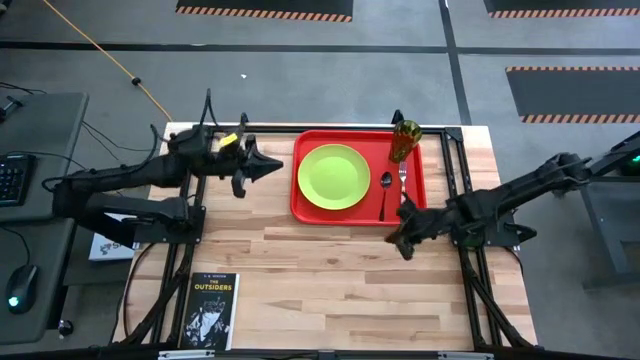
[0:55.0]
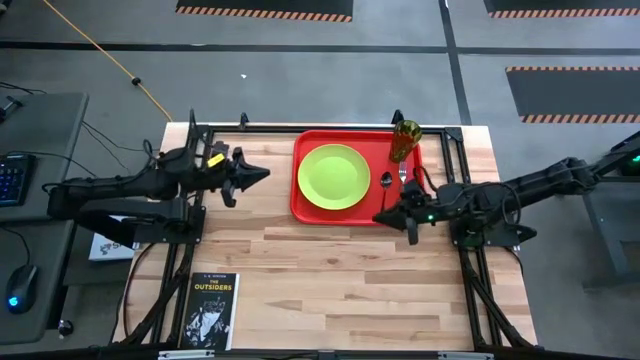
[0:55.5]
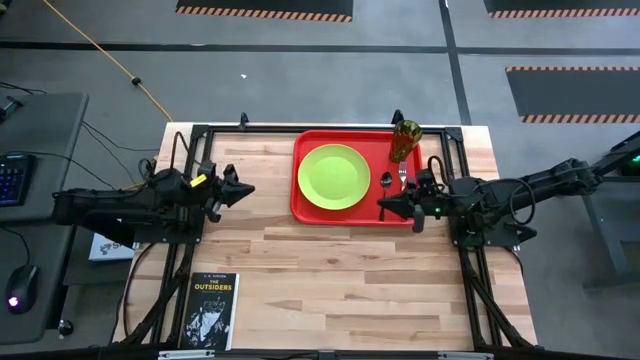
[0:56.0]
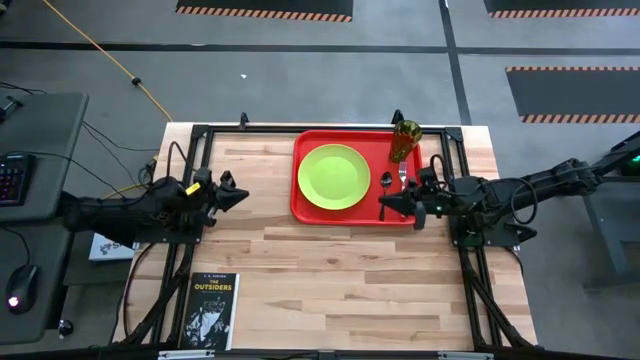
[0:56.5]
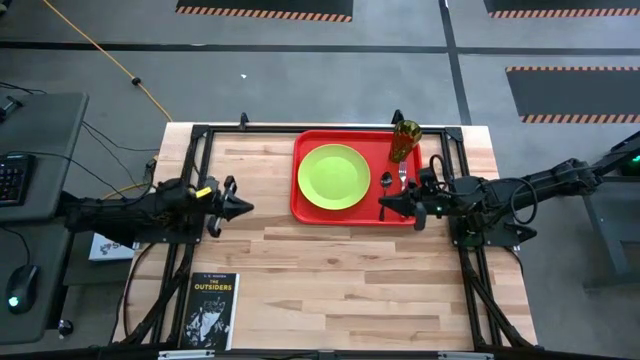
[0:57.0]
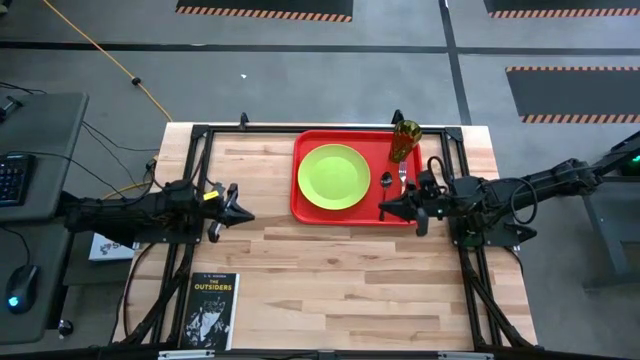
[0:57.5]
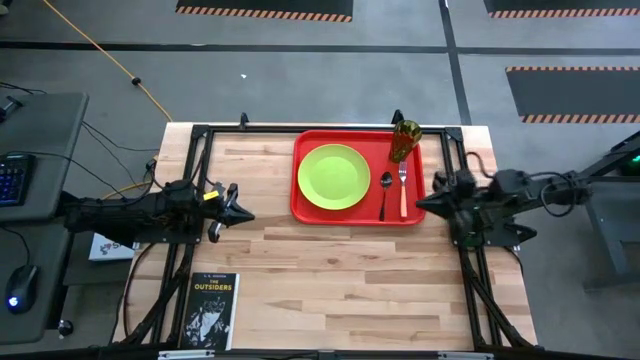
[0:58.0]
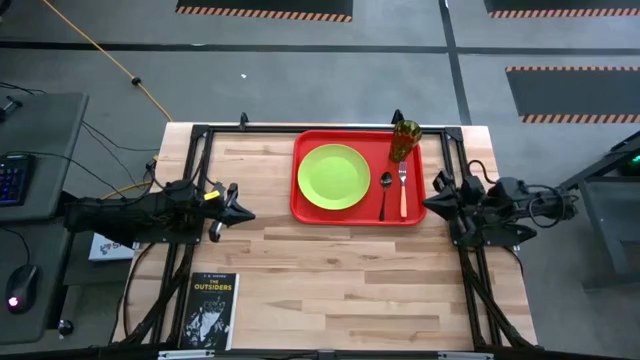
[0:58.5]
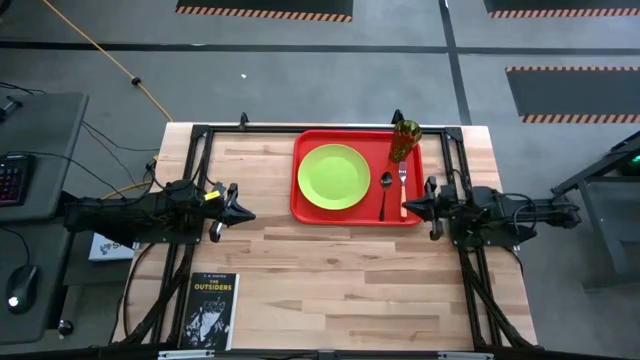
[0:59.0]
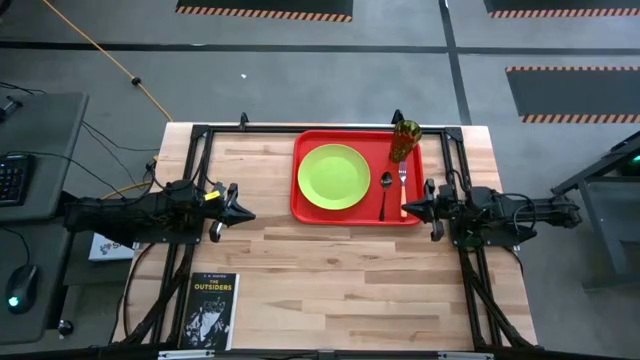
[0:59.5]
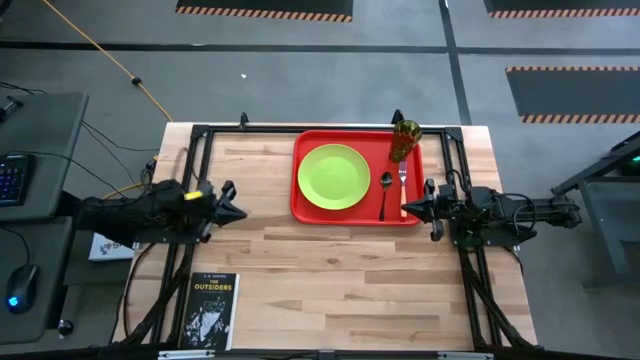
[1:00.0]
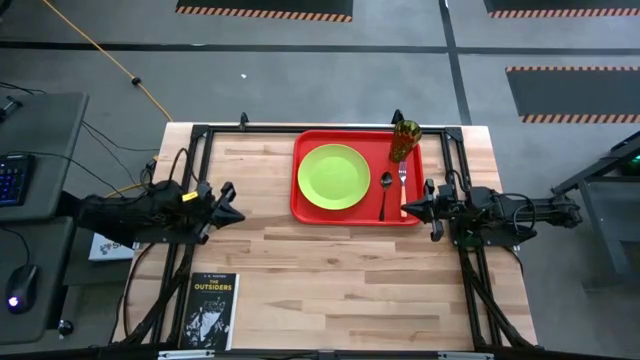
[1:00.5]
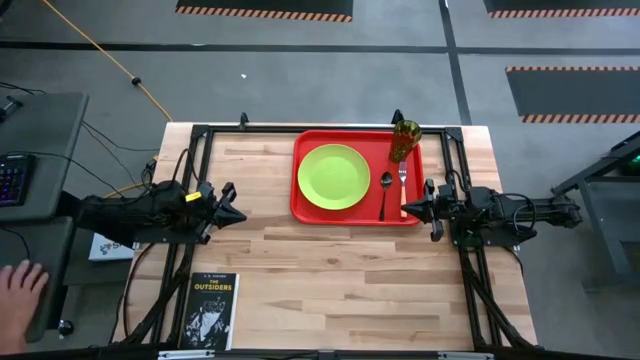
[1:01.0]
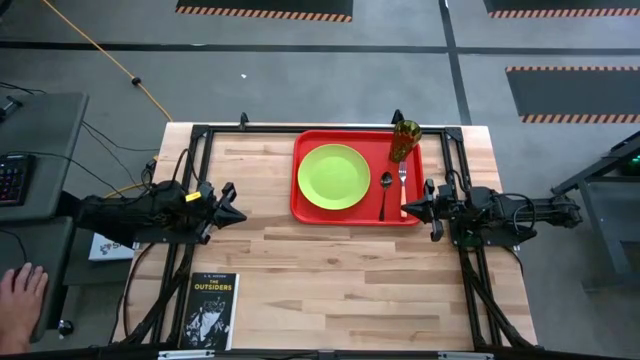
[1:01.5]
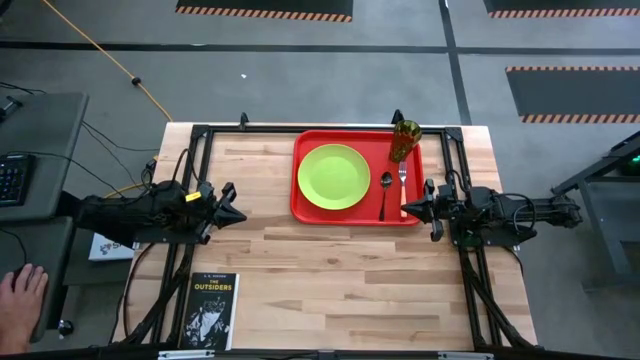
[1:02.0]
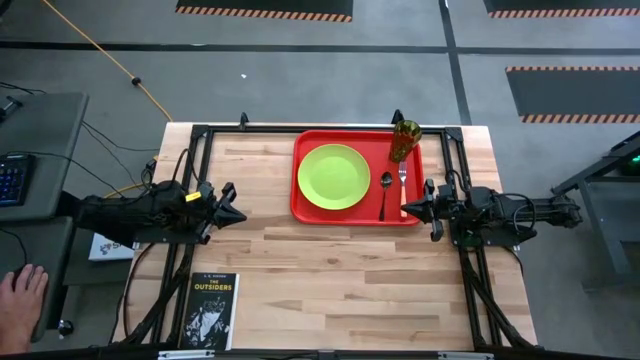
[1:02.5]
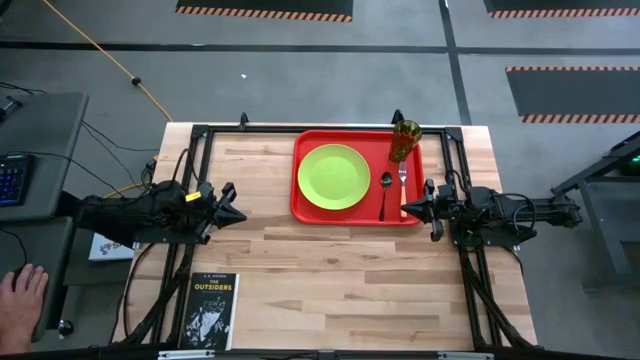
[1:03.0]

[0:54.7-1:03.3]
Task: Pick and place plate/cup/fork/spoon on tray
Return to Home Position

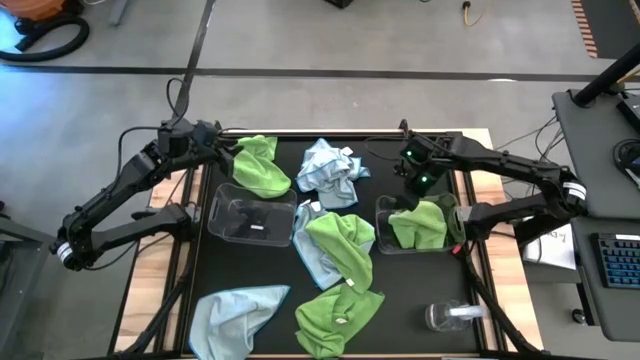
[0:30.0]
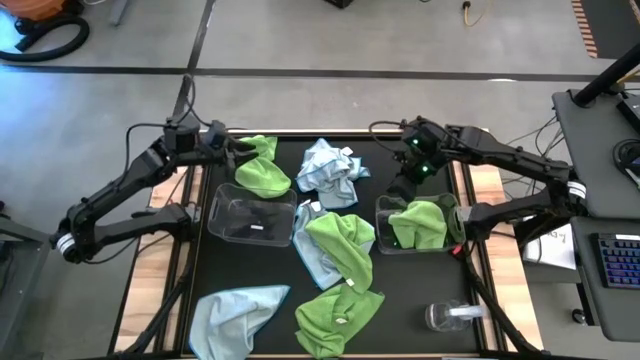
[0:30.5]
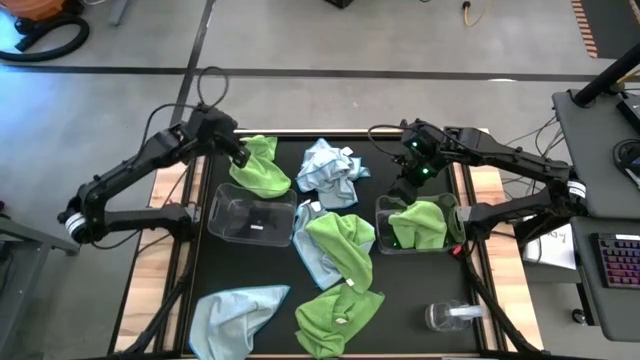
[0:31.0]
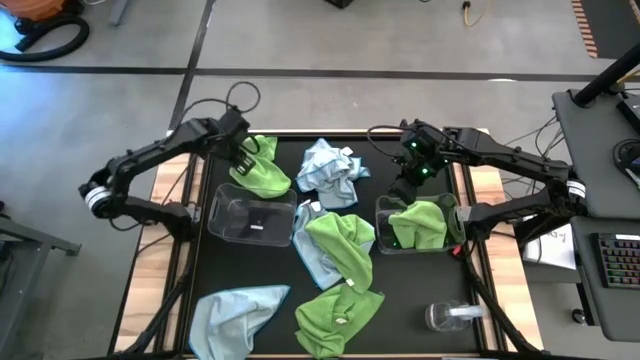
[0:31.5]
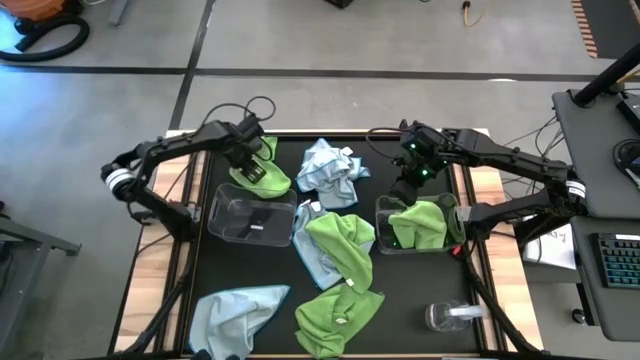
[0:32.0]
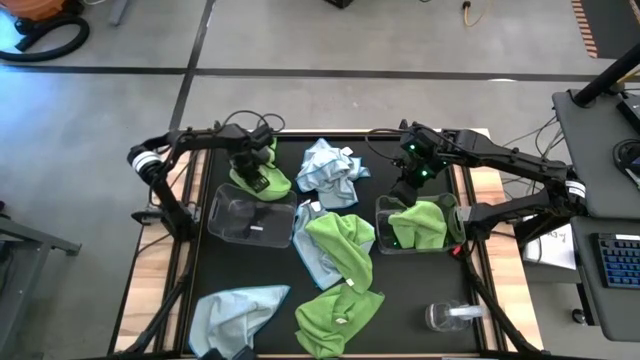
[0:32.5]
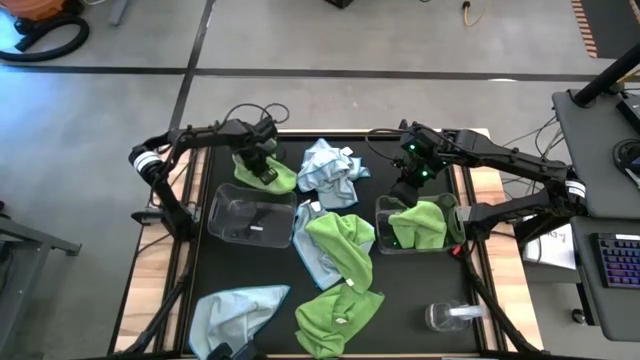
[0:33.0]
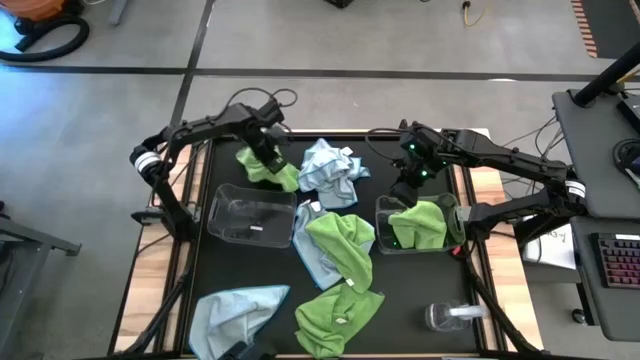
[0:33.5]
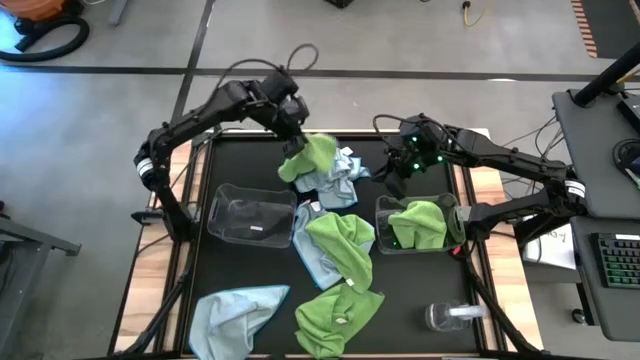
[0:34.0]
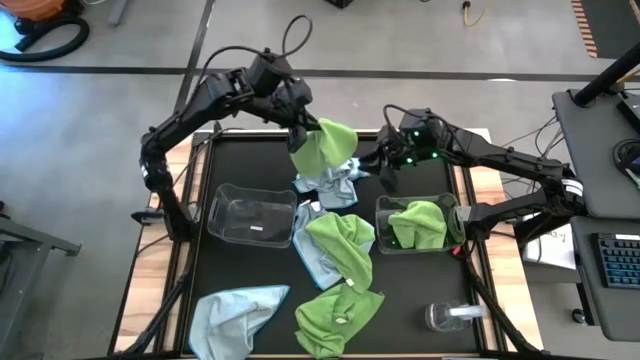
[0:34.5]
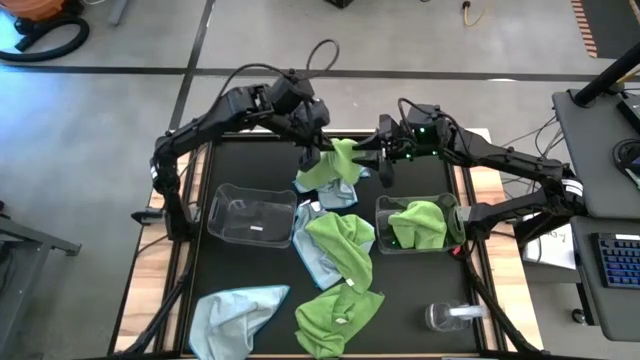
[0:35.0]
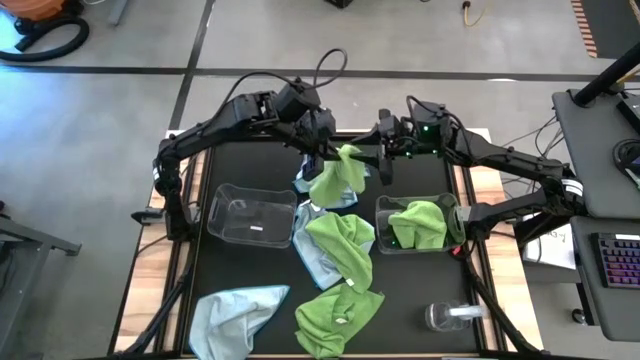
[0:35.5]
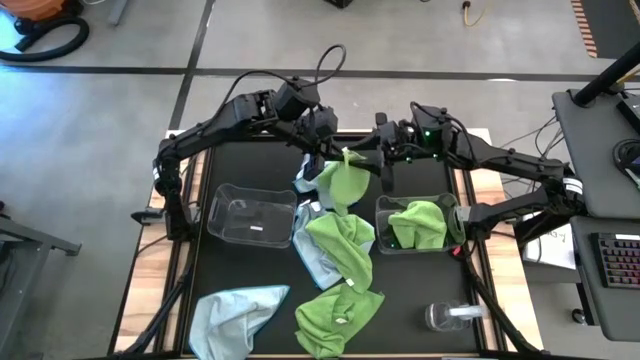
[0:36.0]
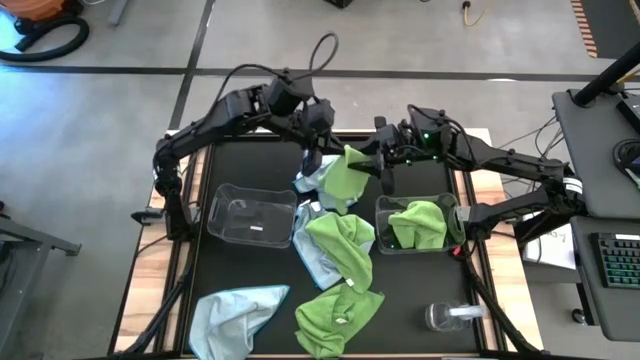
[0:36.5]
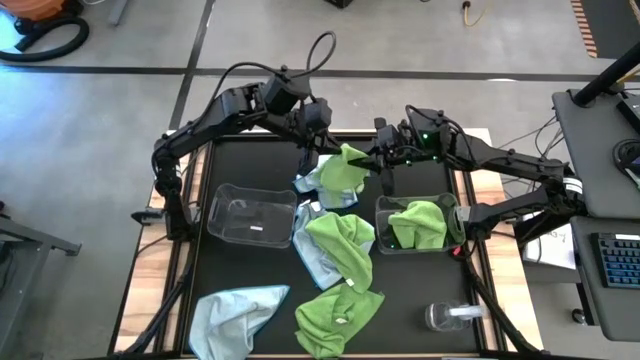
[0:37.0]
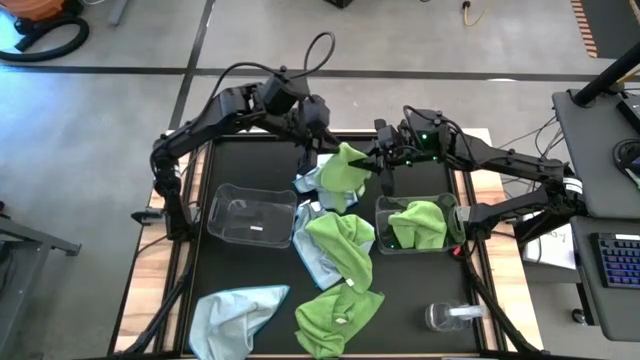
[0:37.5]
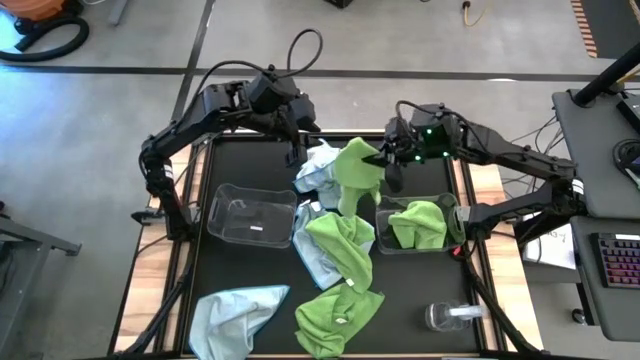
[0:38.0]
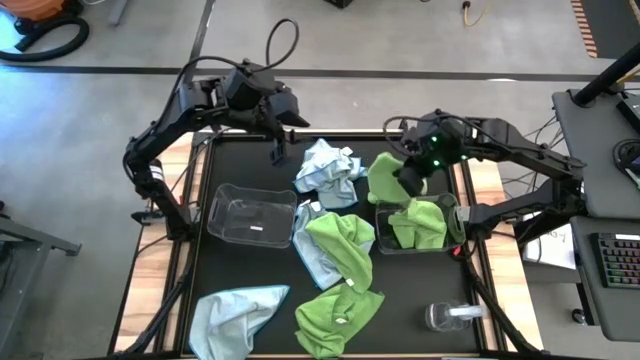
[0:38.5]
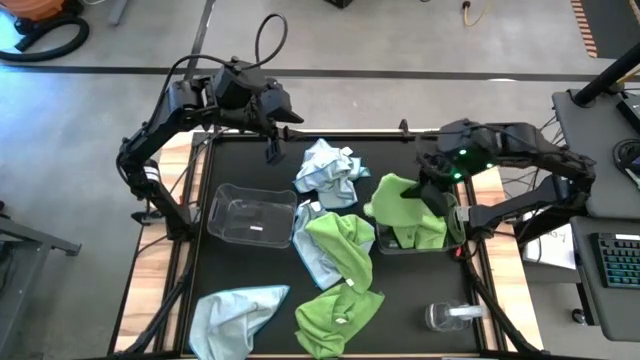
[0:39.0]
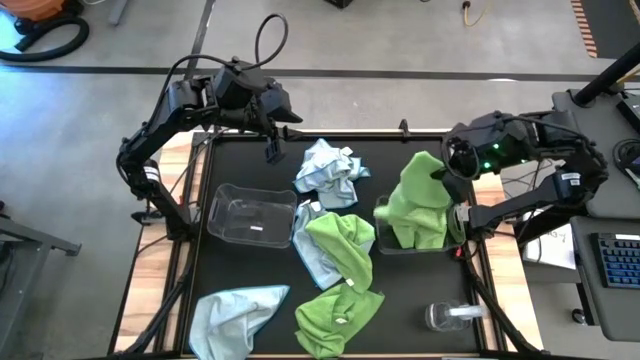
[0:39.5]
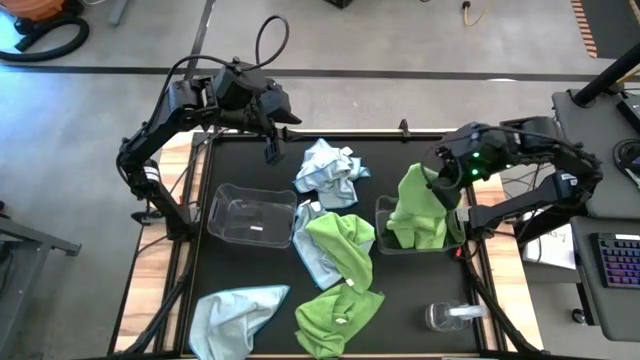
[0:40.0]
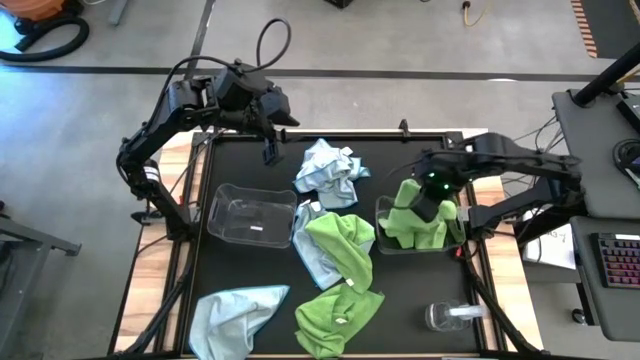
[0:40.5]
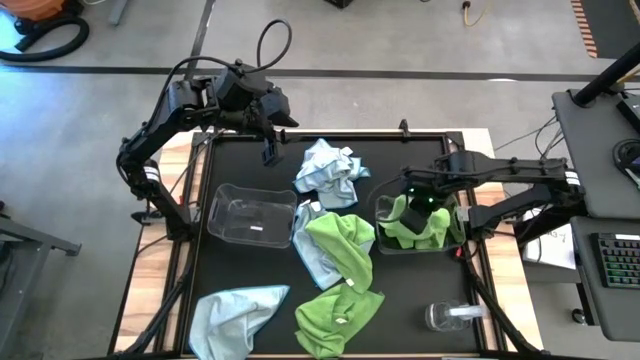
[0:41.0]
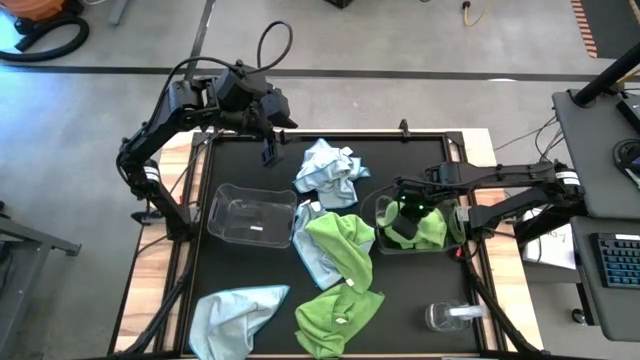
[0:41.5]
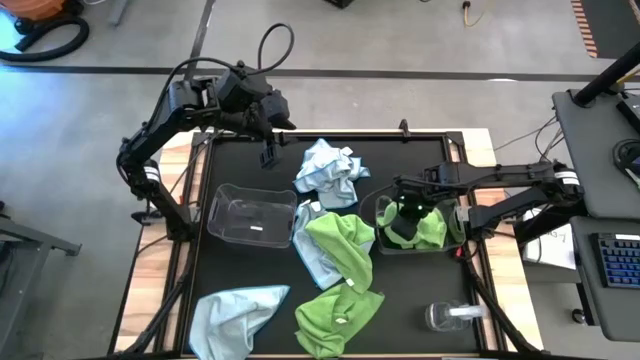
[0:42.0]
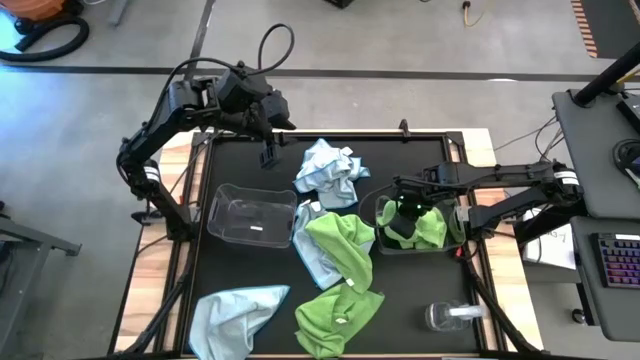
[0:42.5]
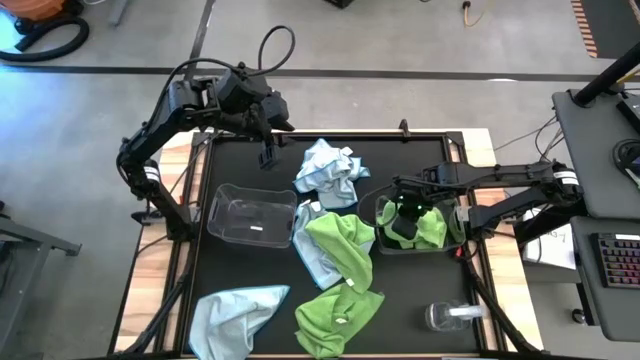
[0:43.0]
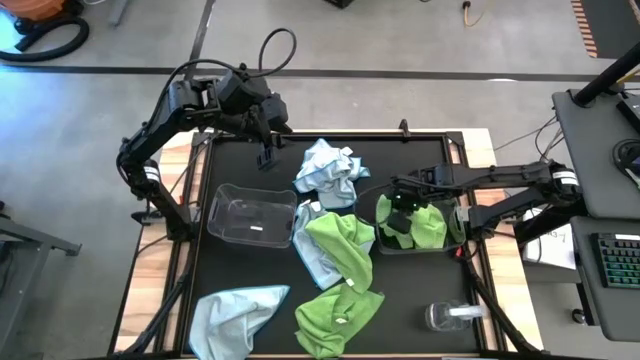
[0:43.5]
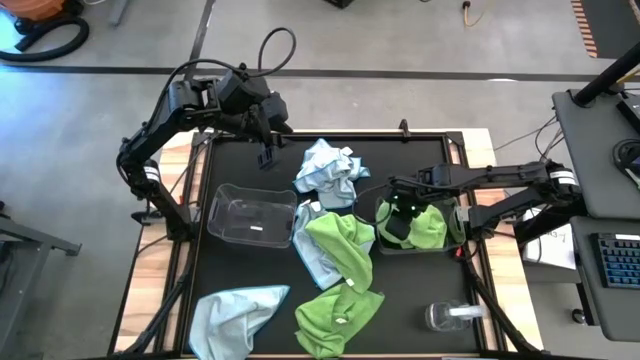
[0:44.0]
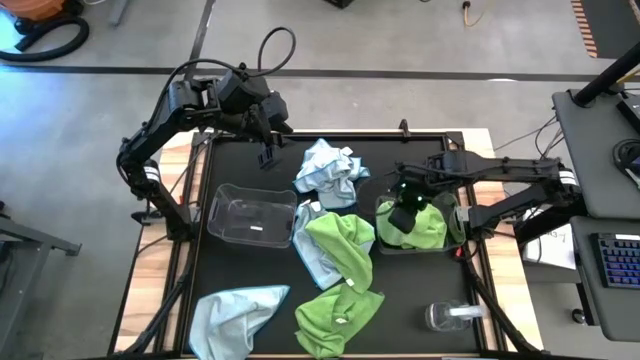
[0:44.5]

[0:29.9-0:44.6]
Task: Sort microfiber towel by color & place in baskets
Put the green towel into the right transparent bin
